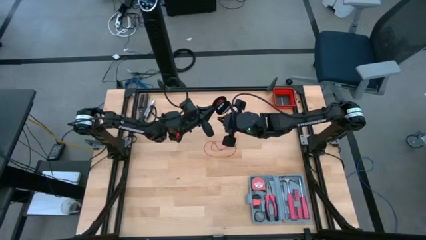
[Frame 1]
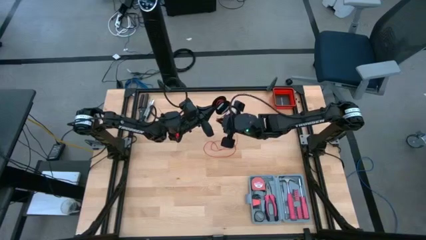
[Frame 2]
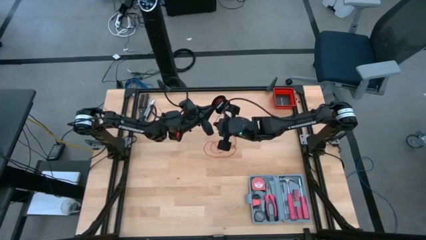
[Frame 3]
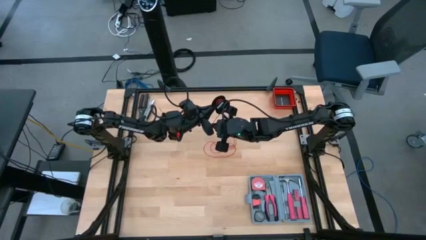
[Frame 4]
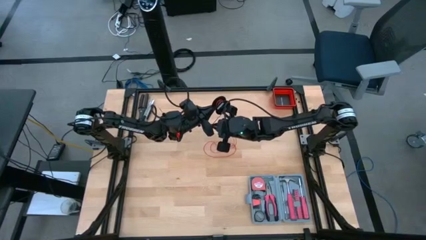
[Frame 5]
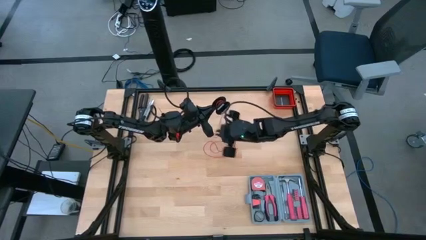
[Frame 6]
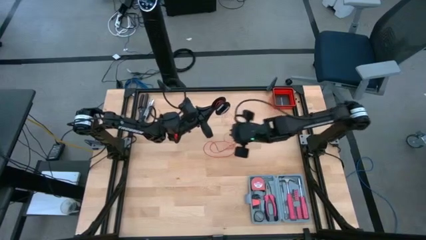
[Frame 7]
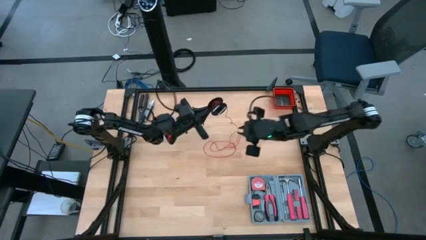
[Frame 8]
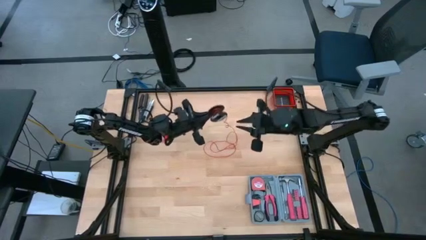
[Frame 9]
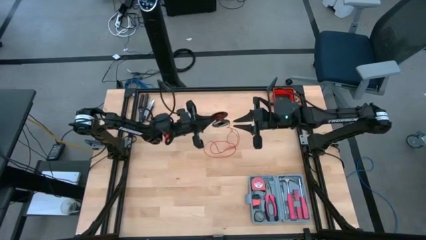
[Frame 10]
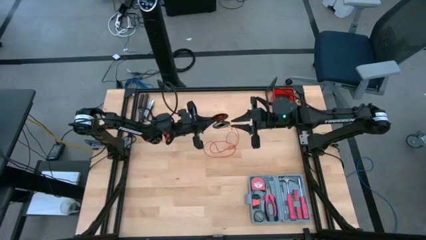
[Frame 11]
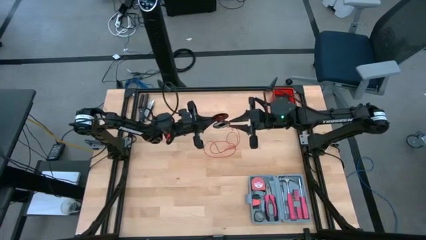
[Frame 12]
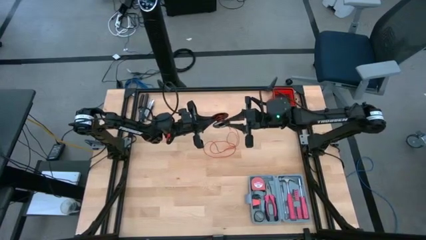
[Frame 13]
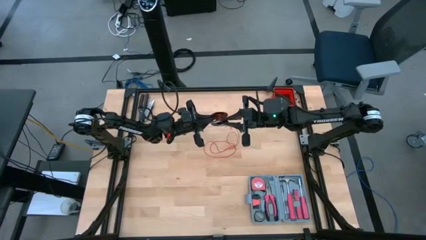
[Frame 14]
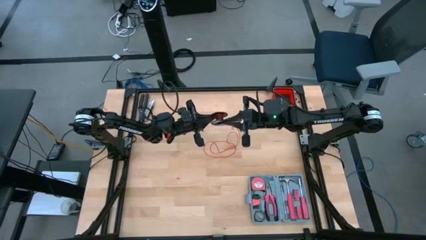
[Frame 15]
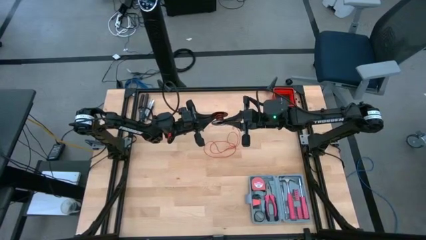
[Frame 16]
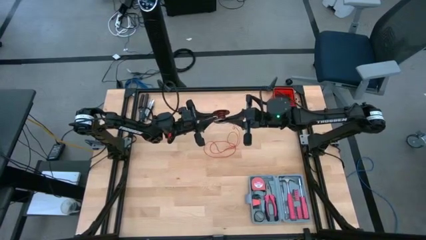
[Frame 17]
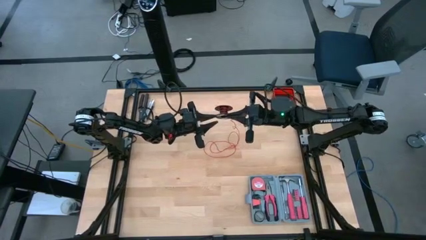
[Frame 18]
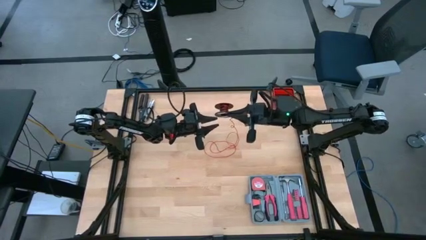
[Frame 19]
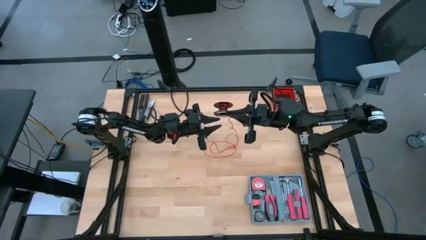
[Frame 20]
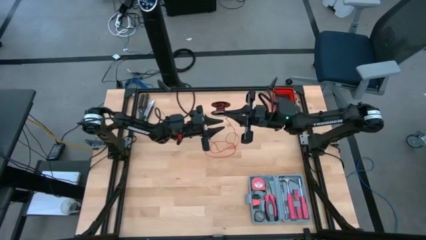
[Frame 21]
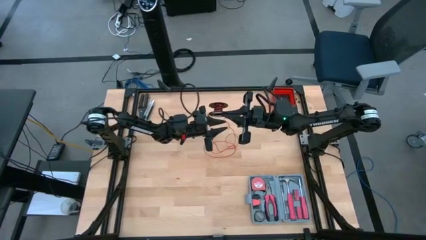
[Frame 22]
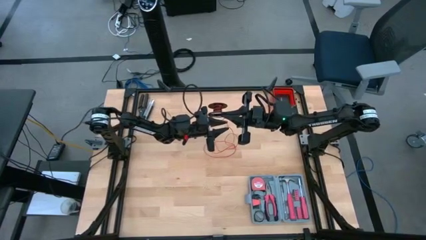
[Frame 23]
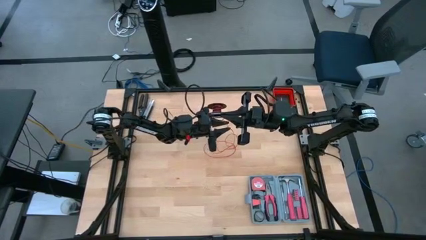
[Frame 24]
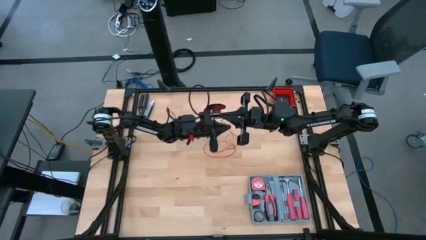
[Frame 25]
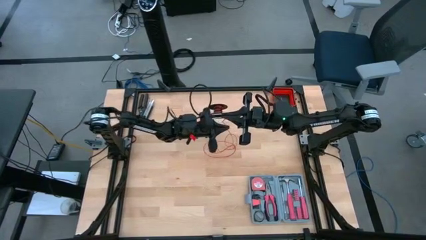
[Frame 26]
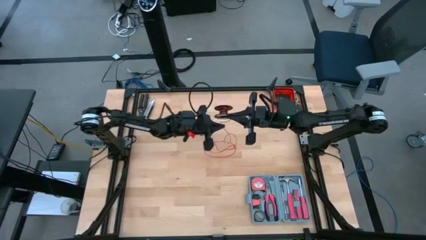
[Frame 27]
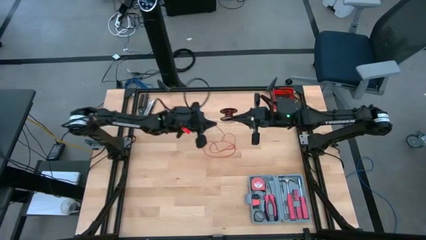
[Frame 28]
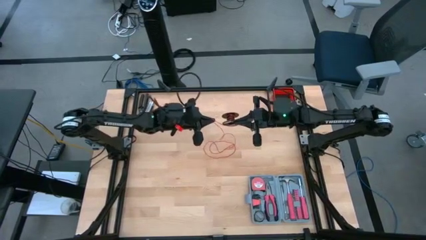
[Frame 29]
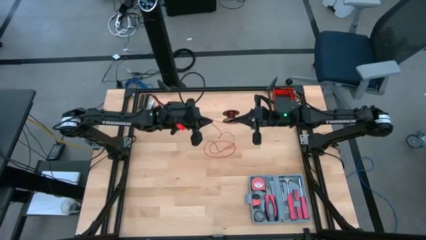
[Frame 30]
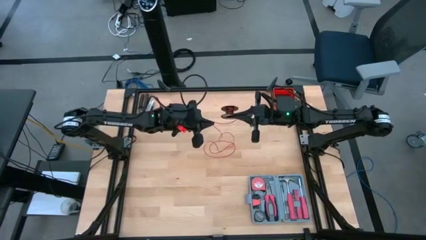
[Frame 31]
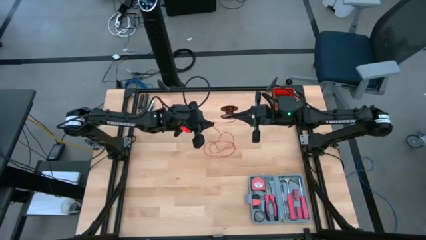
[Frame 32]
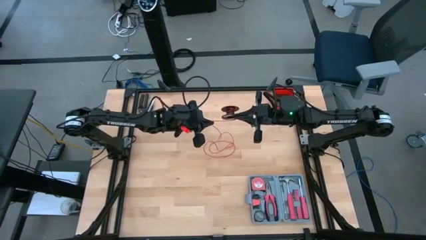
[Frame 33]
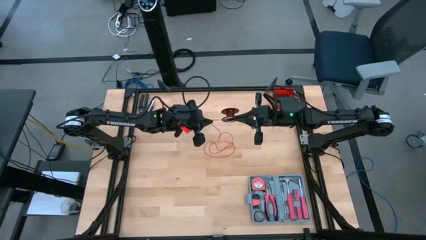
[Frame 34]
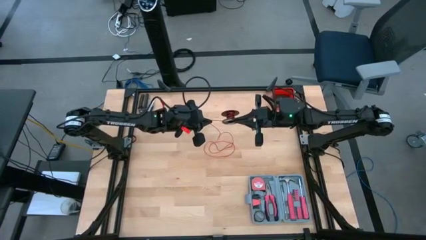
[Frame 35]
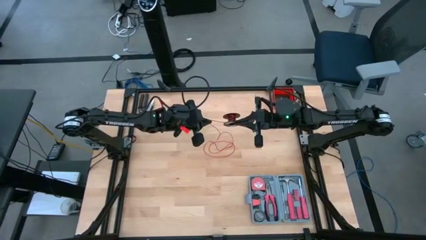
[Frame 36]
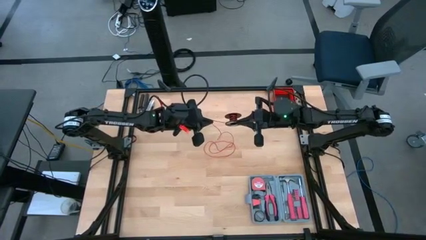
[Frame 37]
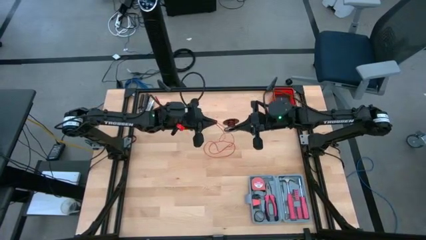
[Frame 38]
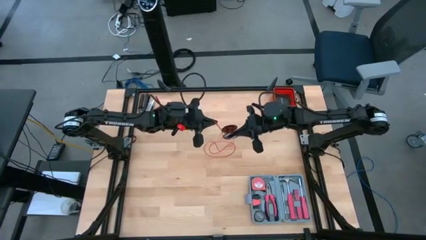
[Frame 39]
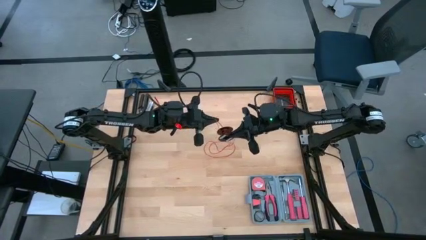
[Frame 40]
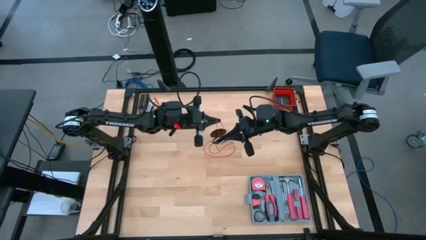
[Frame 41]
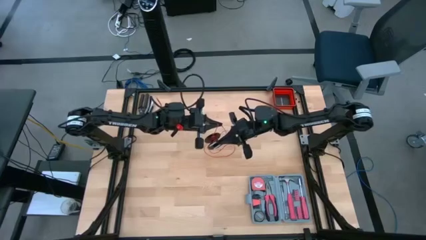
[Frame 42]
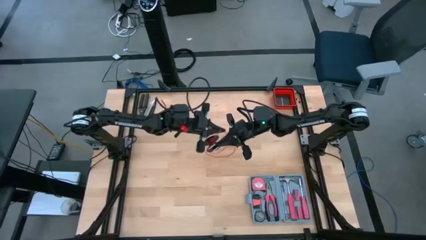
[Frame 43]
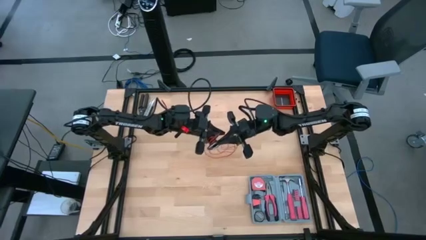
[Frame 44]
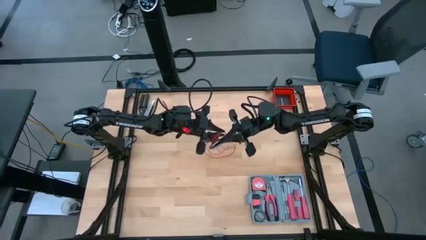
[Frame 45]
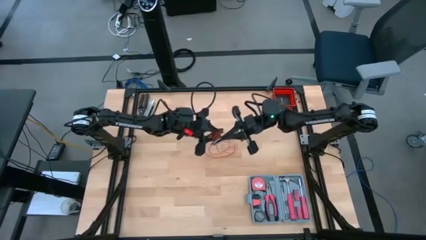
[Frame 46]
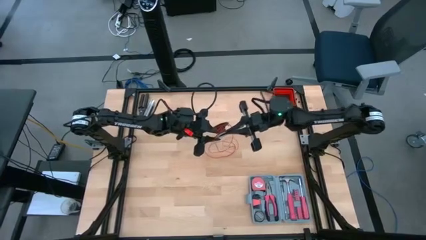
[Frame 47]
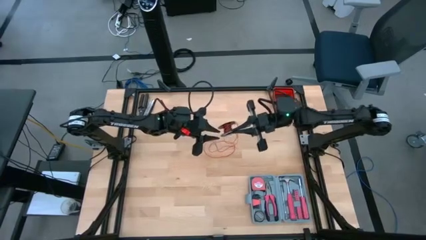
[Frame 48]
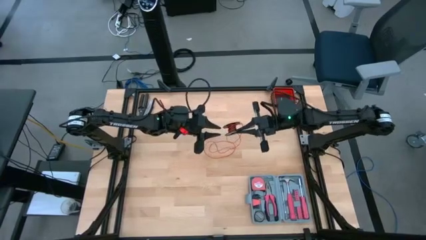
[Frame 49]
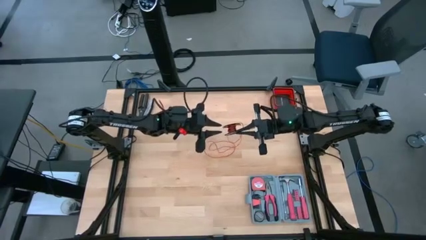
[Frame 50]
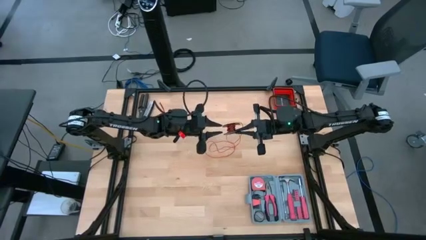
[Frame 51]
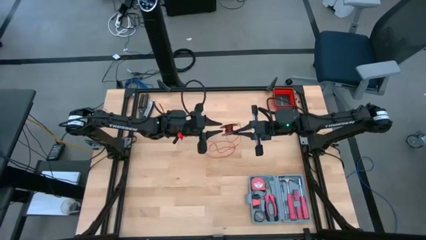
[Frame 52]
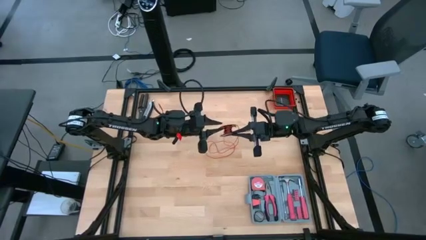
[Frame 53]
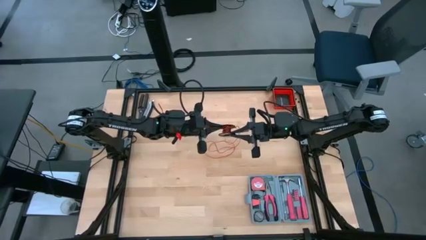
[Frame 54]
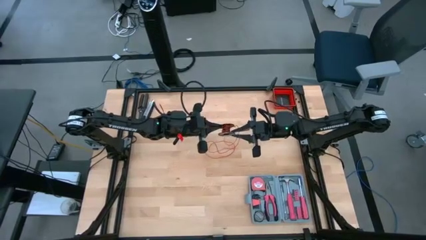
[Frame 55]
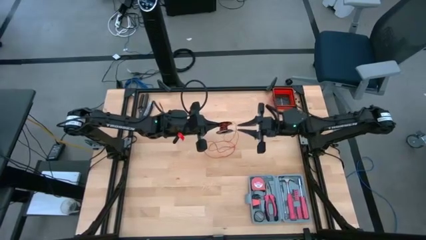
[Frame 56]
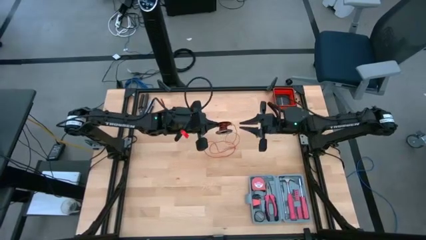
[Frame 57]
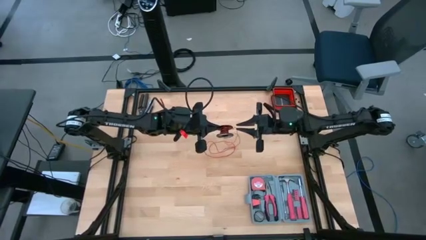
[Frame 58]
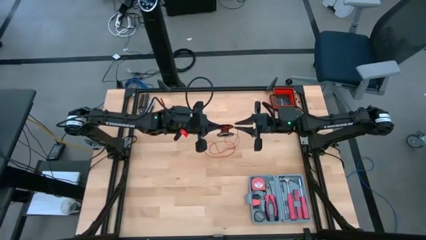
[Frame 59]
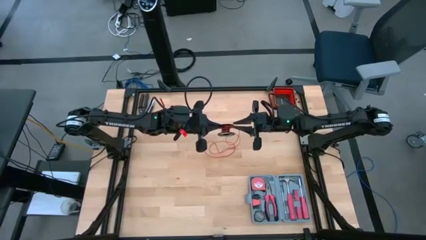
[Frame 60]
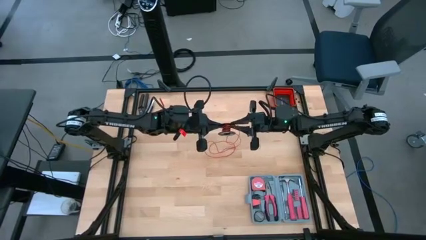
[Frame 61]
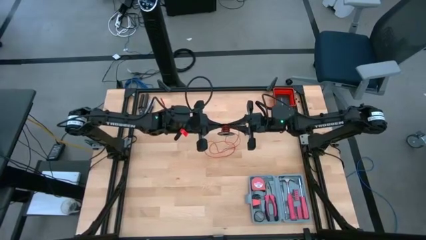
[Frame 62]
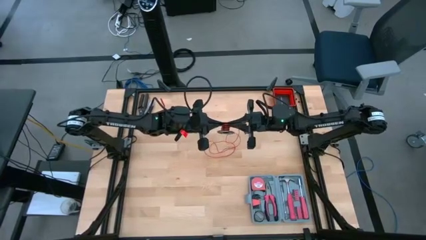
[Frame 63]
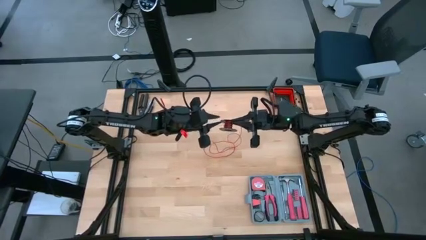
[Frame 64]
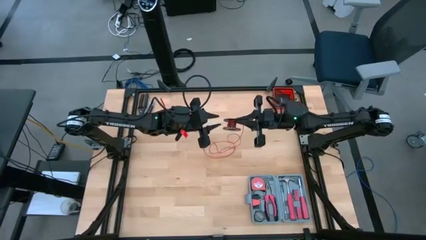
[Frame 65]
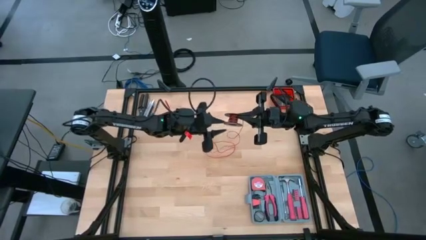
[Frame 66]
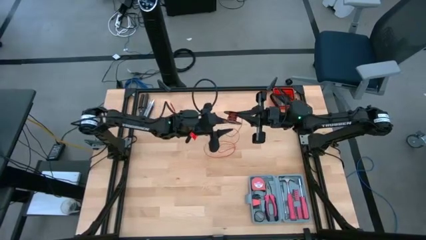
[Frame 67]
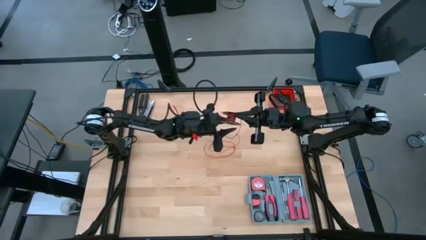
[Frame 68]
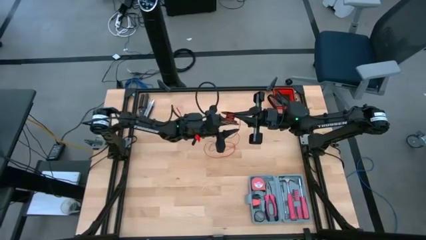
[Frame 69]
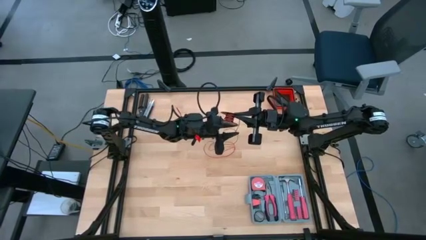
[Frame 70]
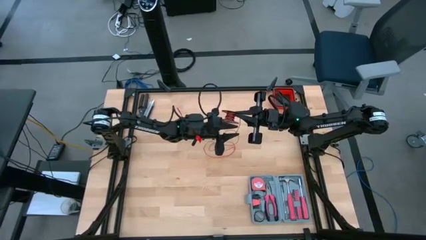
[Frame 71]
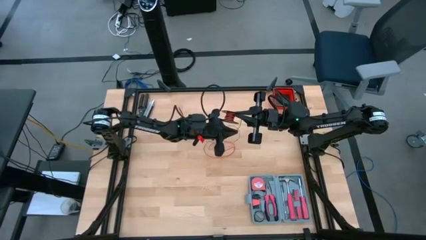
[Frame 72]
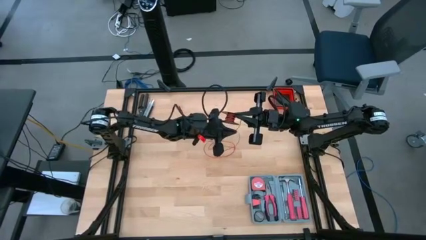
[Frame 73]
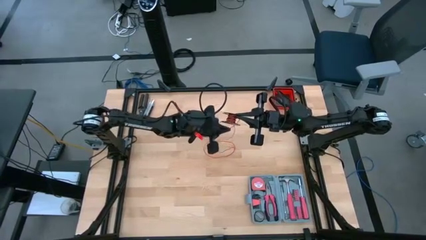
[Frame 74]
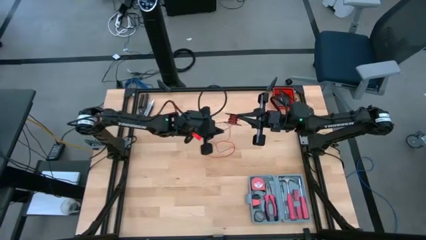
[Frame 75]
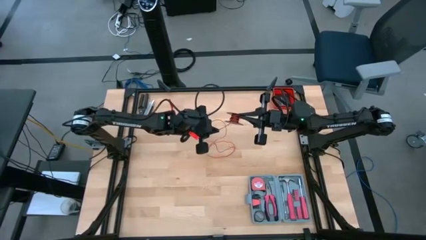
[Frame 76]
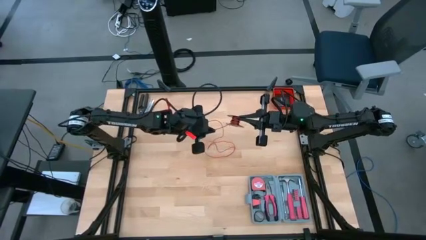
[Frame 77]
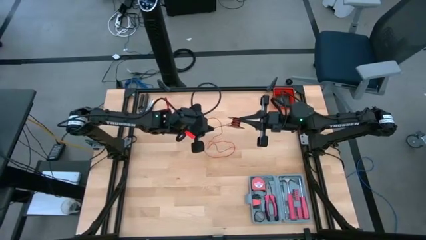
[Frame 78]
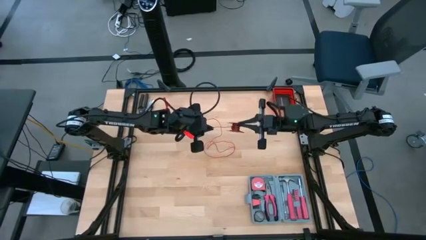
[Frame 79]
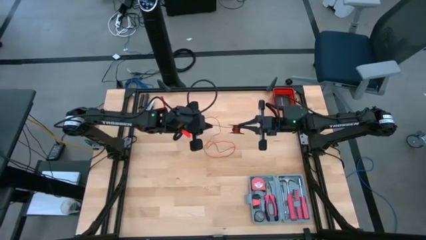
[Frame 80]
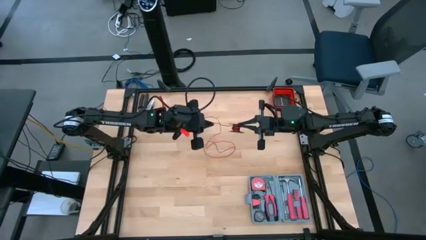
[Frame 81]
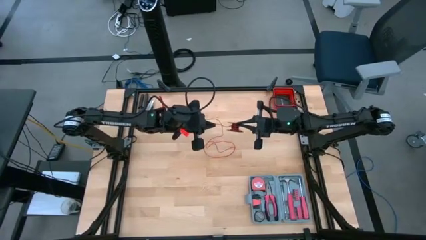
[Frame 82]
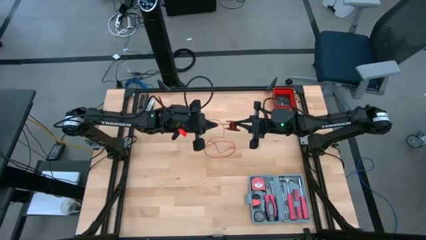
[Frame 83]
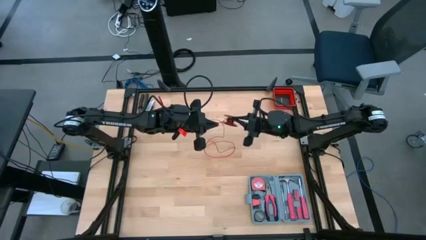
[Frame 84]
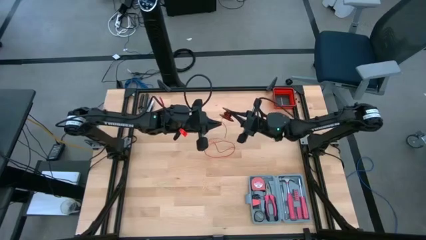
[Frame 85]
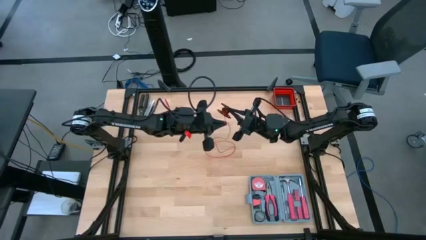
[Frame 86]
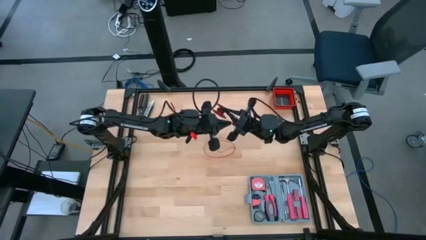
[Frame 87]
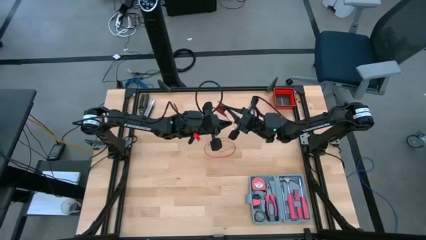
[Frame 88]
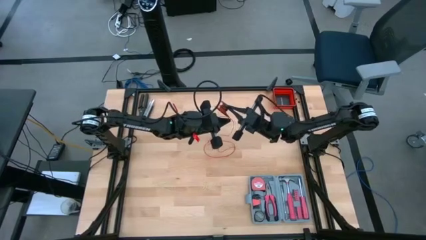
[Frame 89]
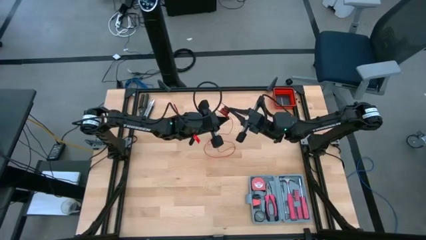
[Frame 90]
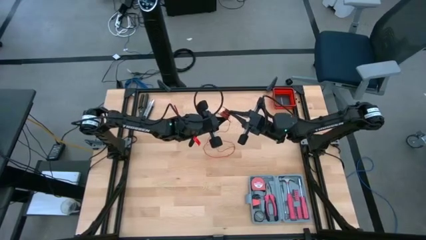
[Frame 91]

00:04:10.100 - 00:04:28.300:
Task: Coil cords
Coil the wire
